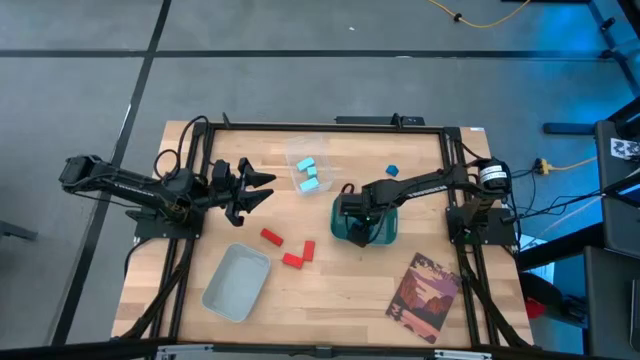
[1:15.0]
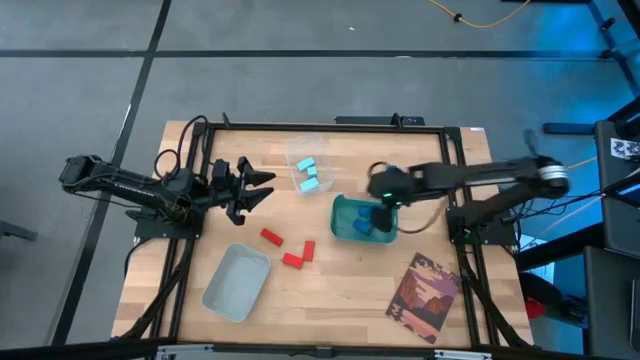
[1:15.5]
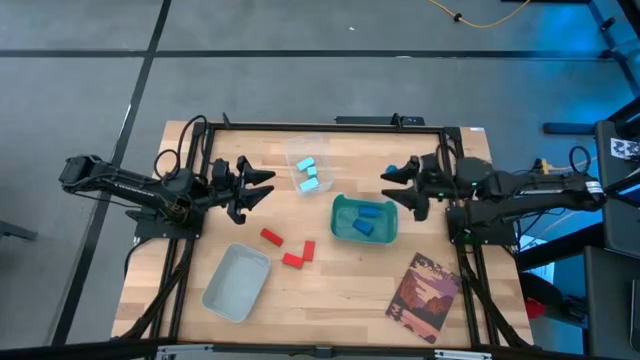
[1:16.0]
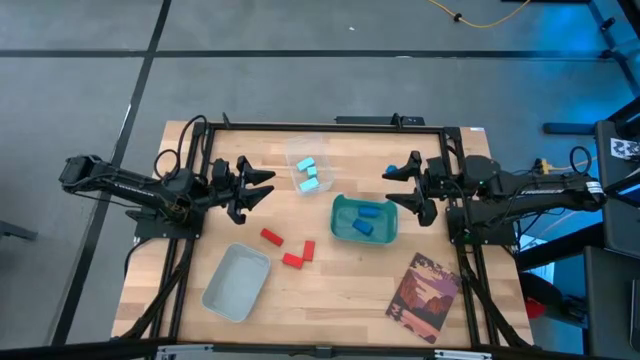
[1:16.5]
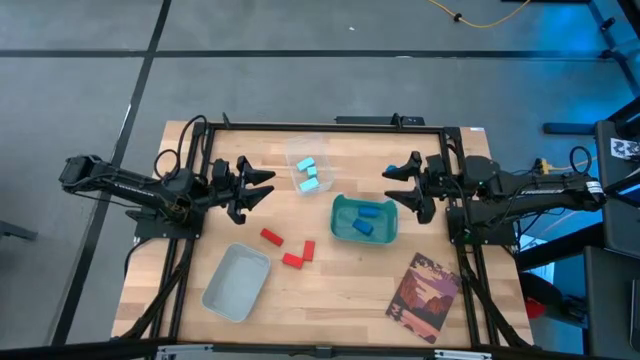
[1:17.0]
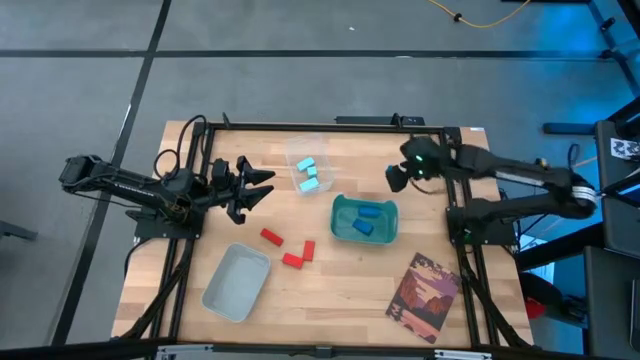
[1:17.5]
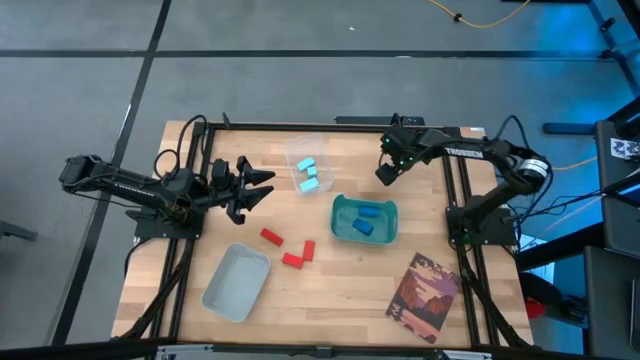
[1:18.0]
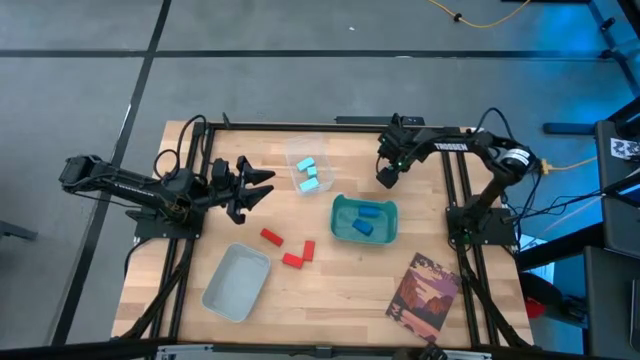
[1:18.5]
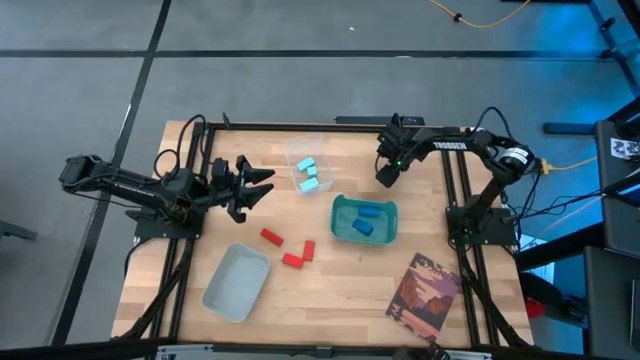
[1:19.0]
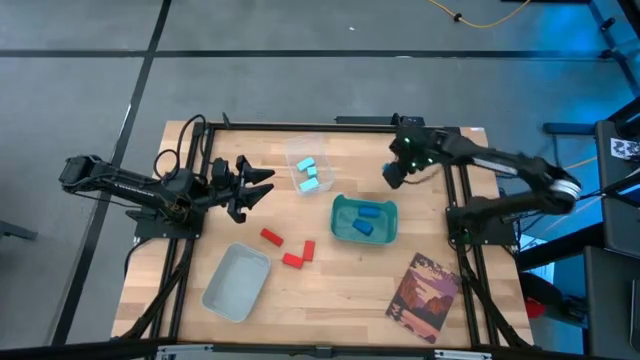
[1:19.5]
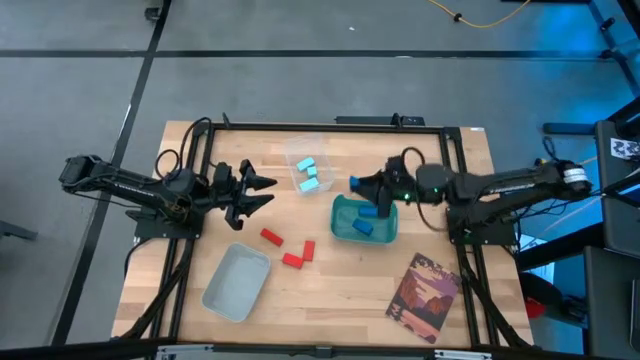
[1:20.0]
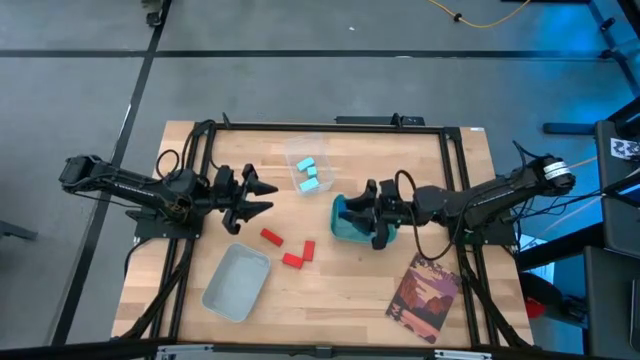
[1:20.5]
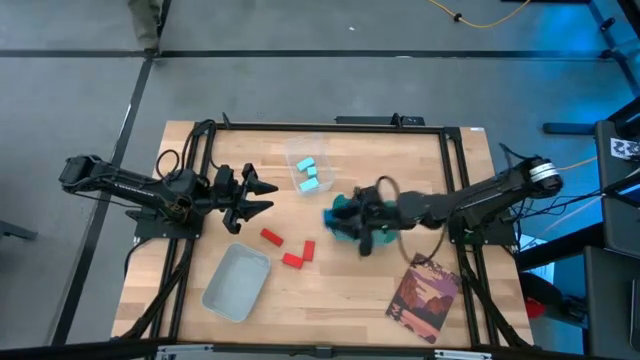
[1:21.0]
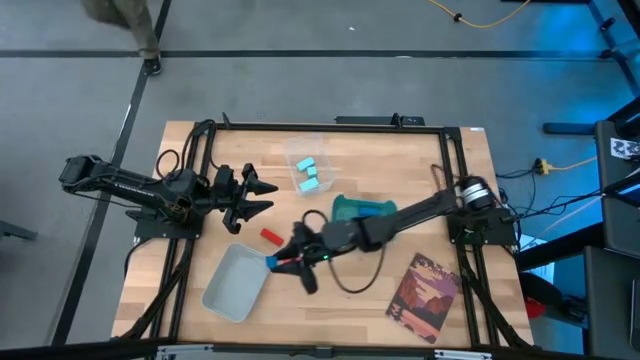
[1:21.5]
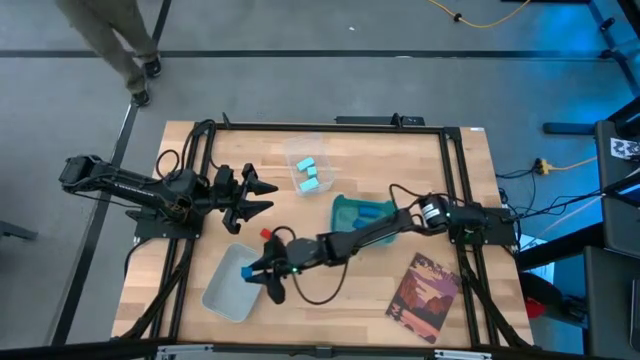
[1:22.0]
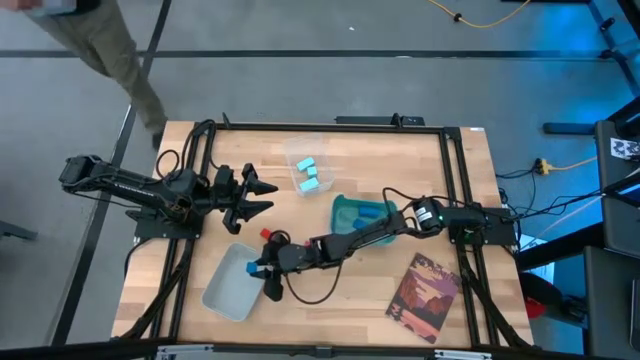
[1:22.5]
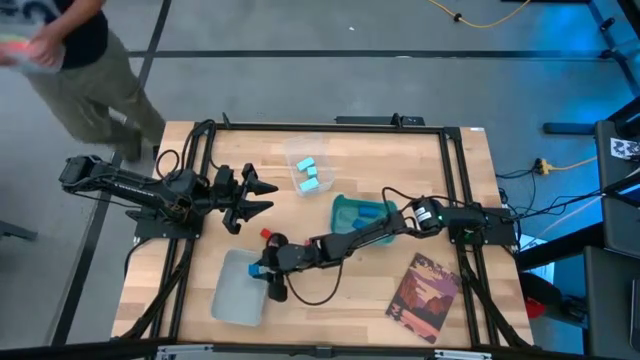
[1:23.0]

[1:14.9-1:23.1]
Task: Sort & place blocks by color
Put the blue block into the gray bin

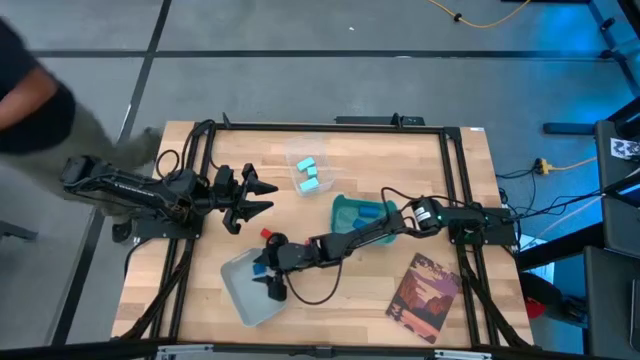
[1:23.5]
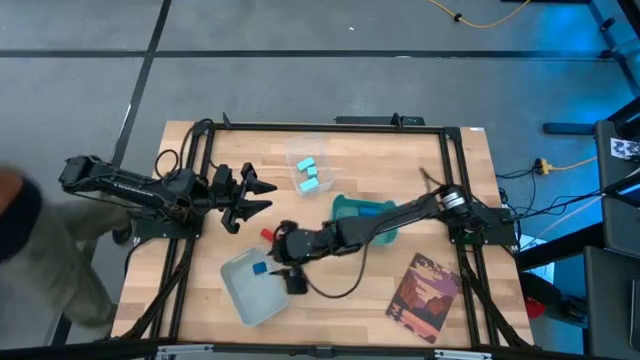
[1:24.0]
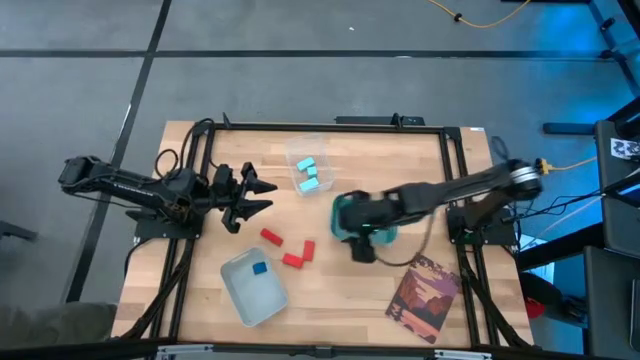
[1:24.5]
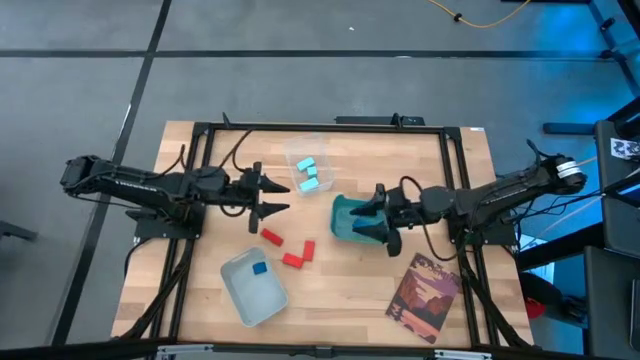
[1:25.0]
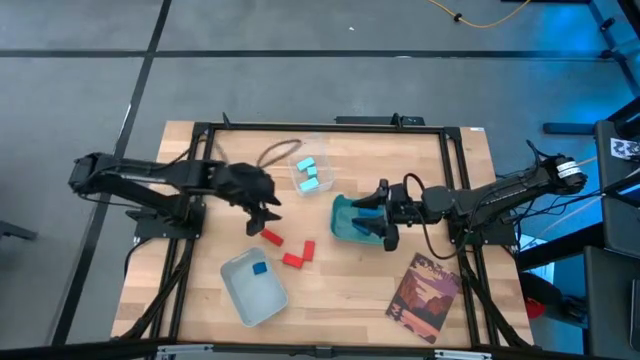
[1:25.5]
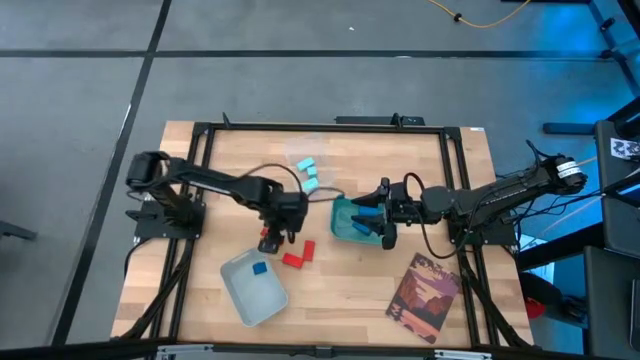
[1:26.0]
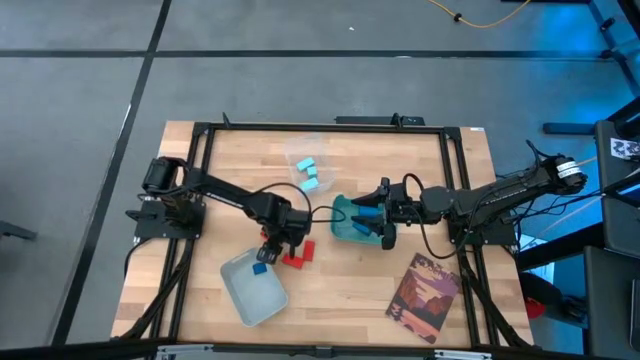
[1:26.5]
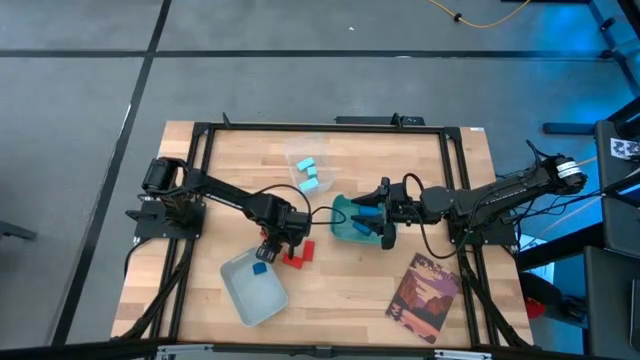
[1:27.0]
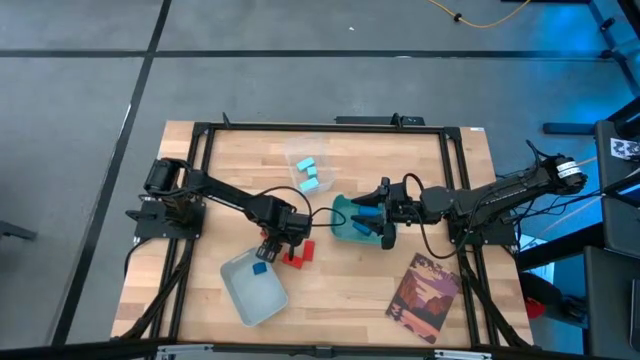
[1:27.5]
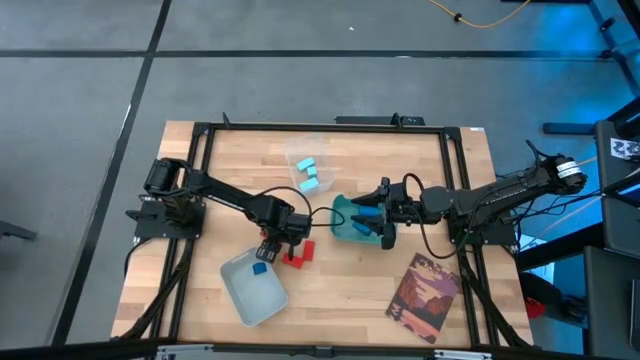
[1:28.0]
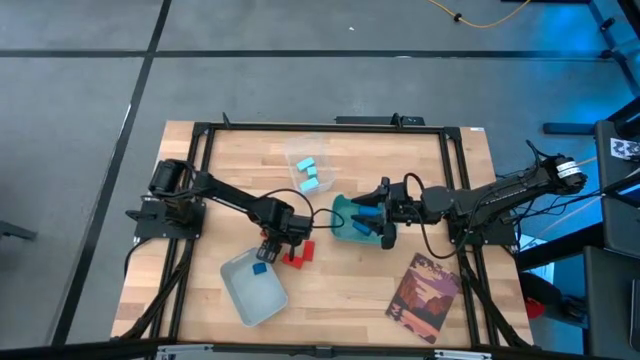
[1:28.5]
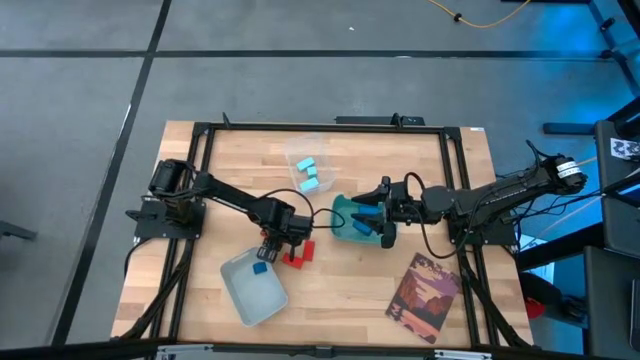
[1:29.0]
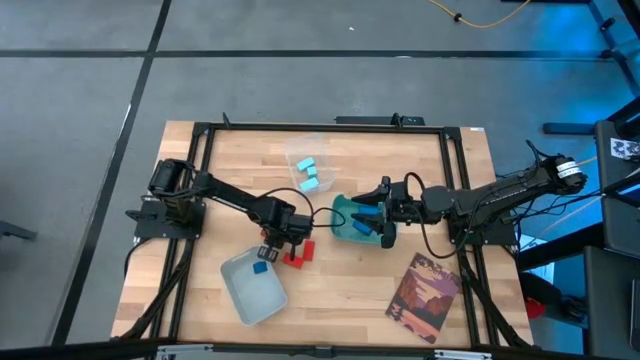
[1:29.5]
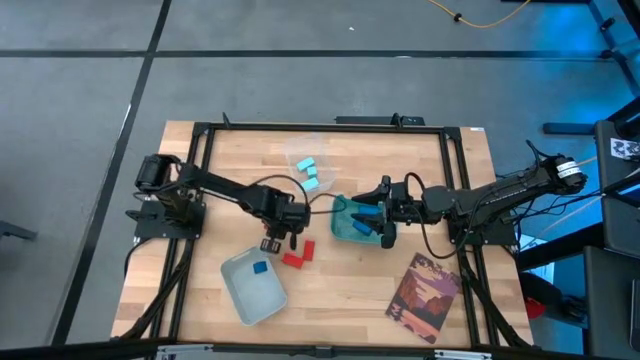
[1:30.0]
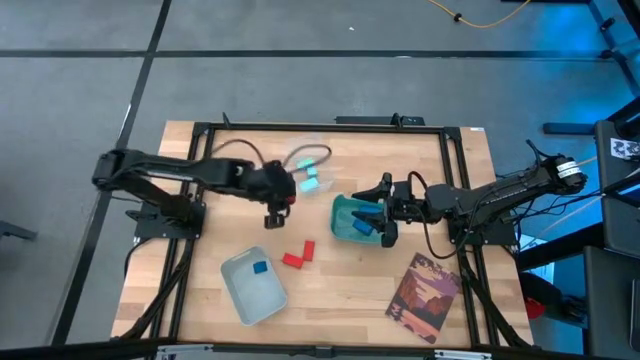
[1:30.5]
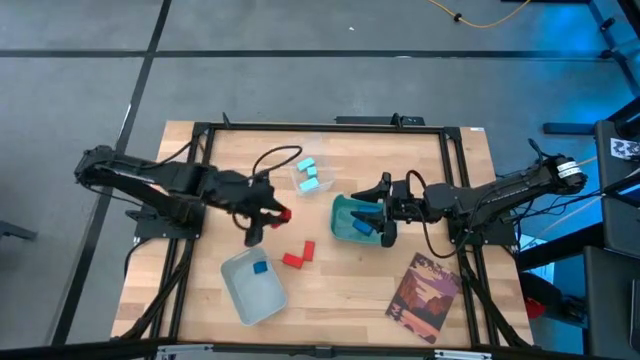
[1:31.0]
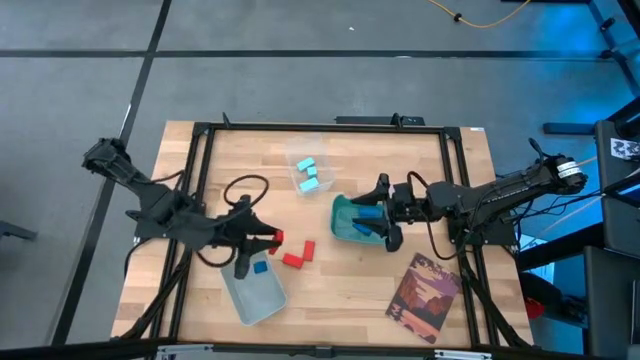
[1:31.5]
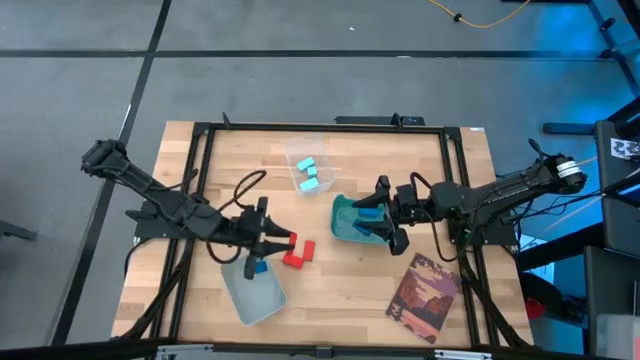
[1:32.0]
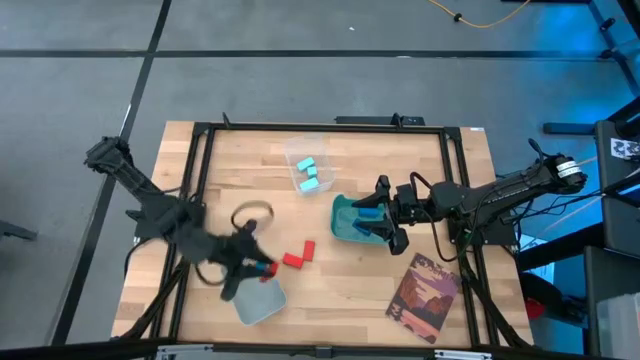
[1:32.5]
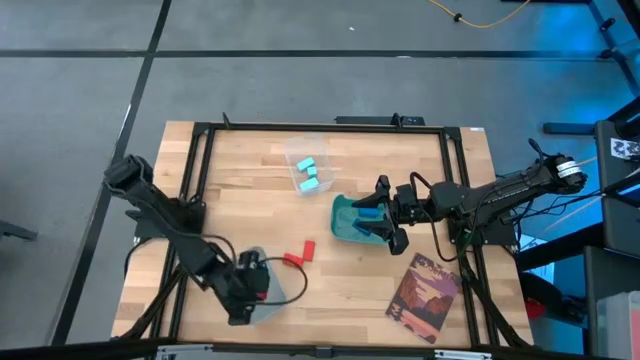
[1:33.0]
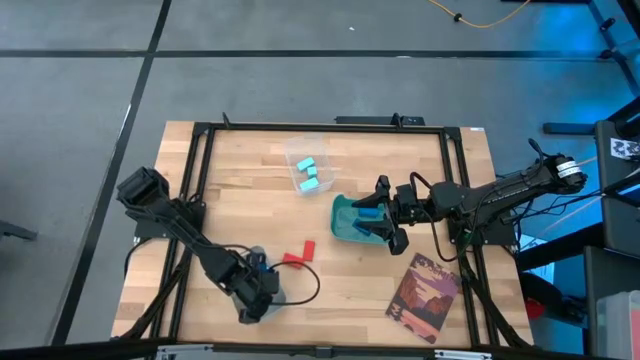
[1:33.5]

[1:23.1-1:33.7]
Put the red block into the gray bin

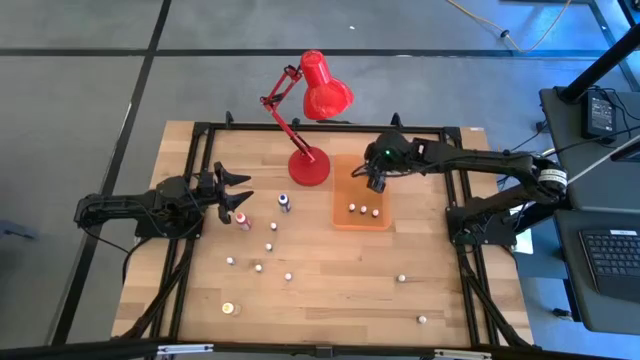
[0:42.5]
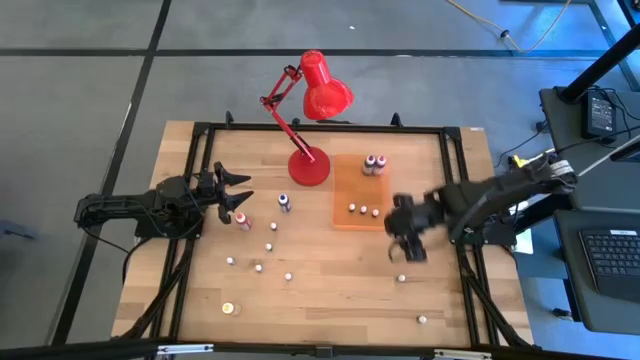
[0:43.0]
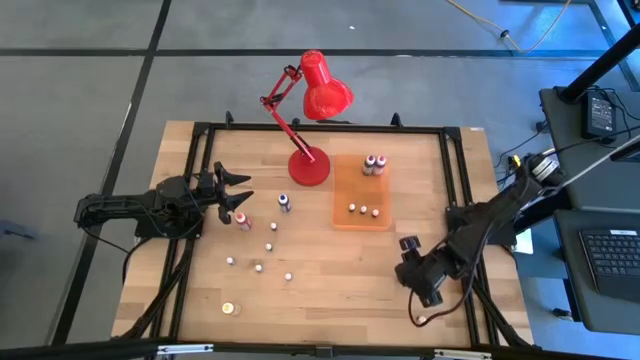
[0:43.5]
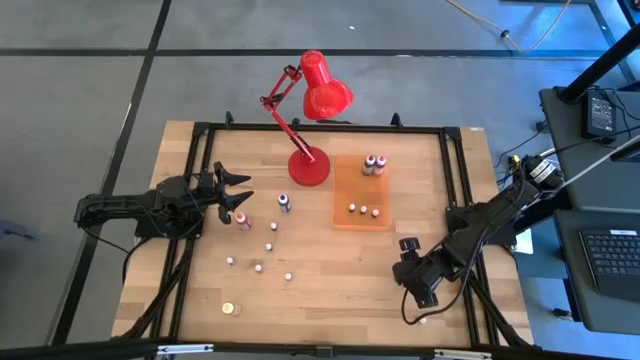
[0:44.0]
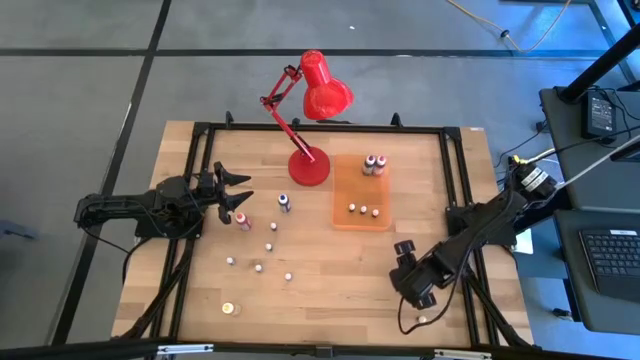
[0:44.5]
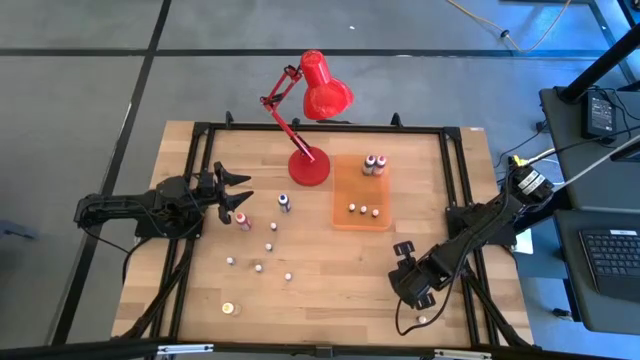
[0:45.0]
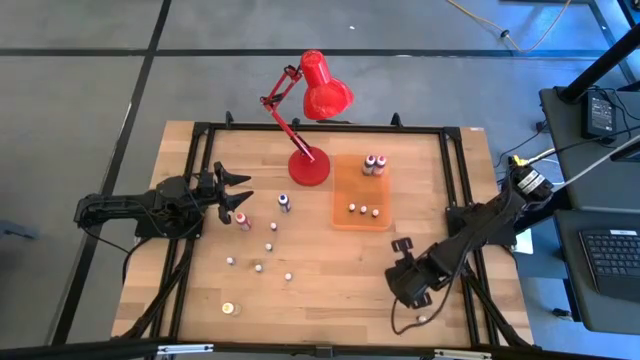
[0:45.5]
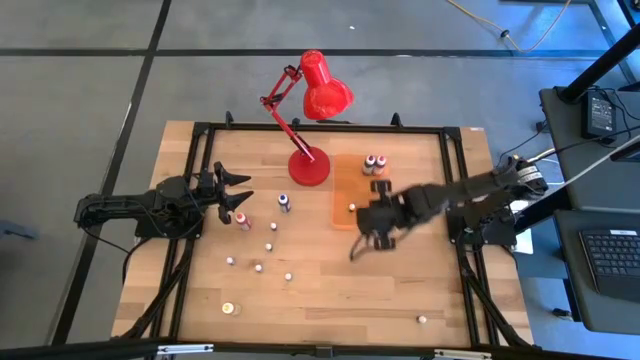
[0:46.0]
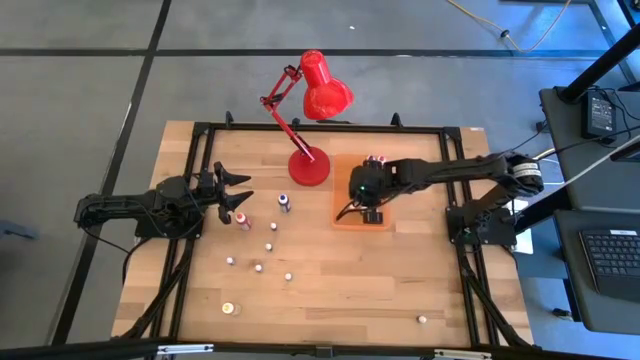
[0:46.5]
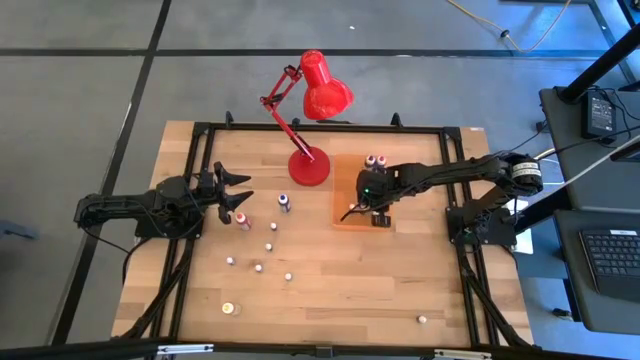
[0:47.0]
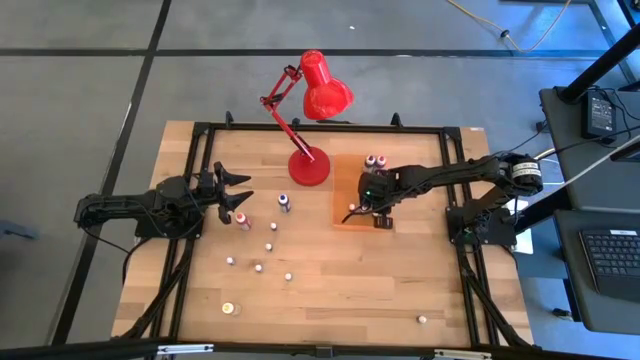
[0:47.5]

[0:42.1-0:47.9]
Task: Pick & Place food coloring
Put the right small blue food coloring bottle into the orange bin
